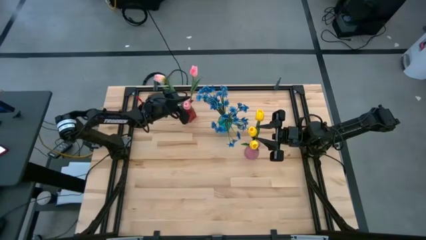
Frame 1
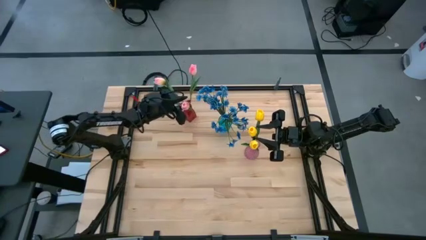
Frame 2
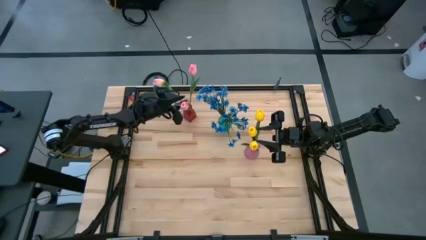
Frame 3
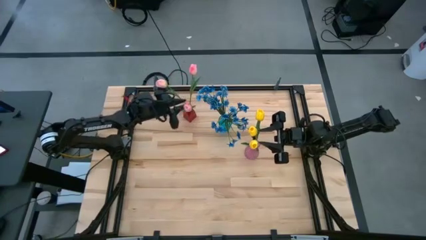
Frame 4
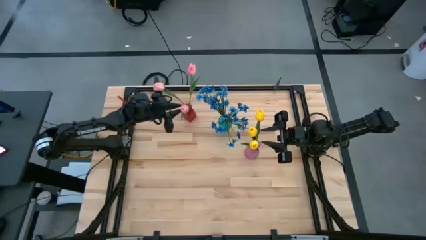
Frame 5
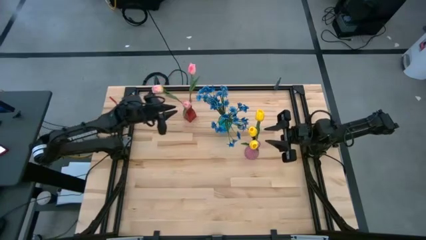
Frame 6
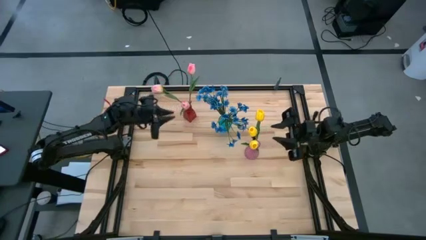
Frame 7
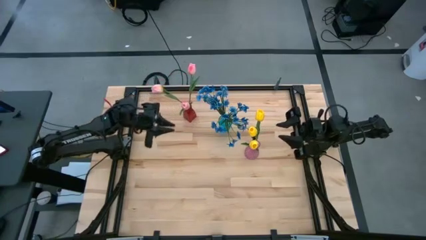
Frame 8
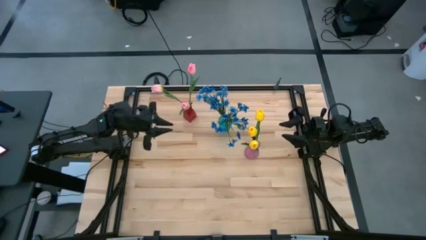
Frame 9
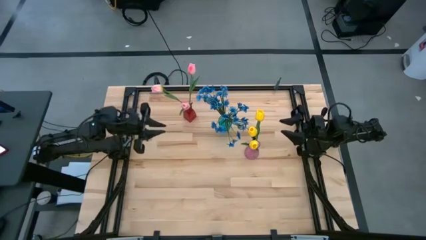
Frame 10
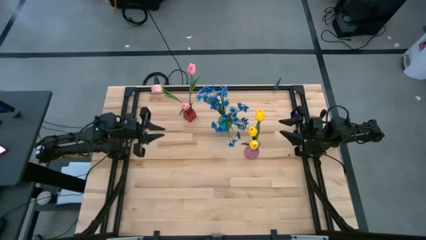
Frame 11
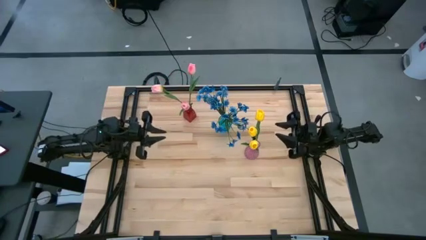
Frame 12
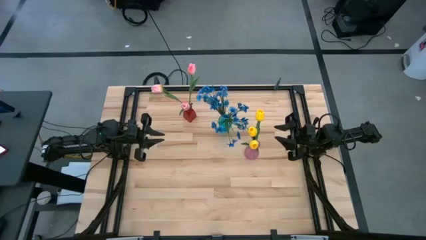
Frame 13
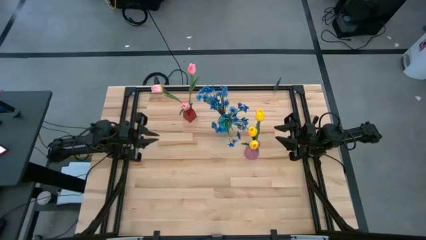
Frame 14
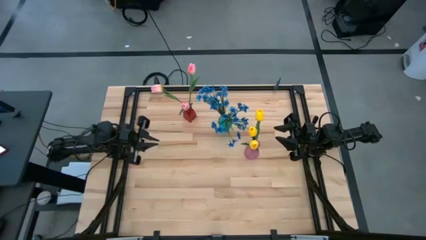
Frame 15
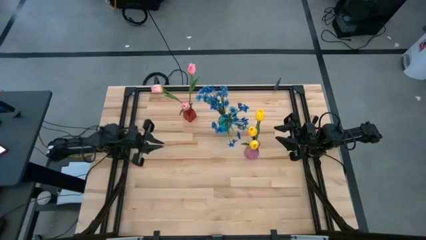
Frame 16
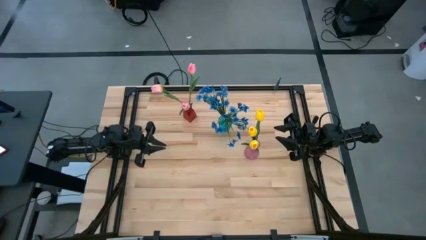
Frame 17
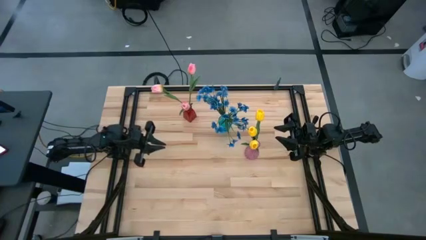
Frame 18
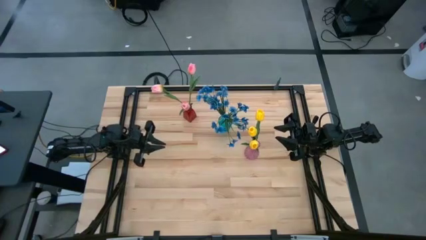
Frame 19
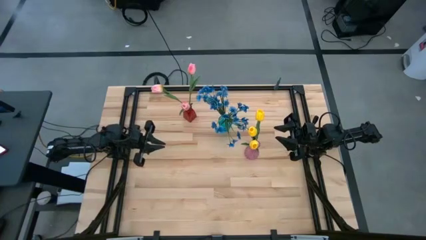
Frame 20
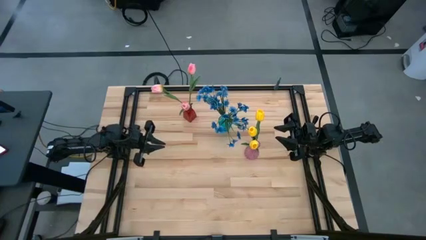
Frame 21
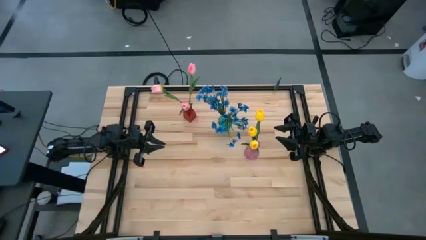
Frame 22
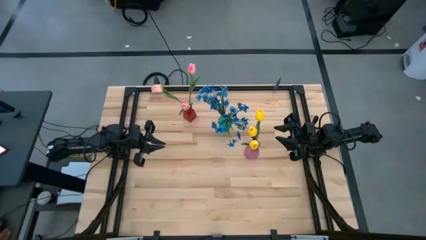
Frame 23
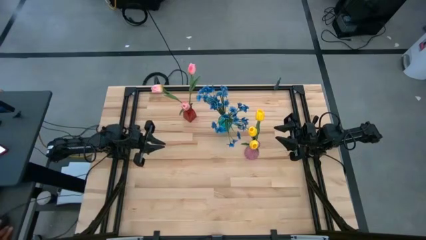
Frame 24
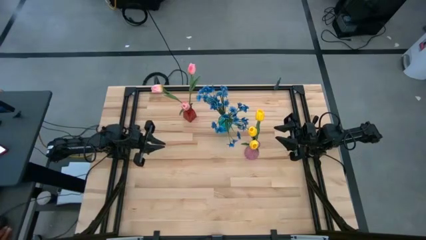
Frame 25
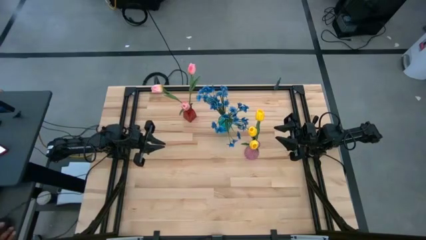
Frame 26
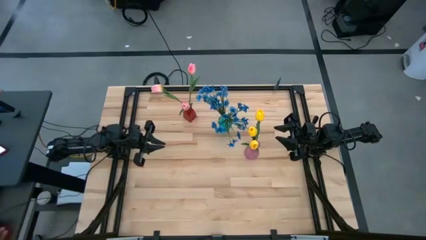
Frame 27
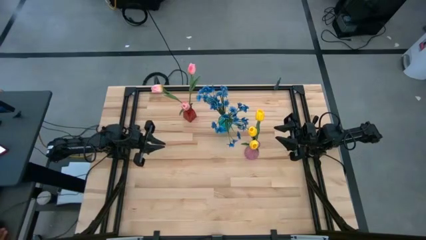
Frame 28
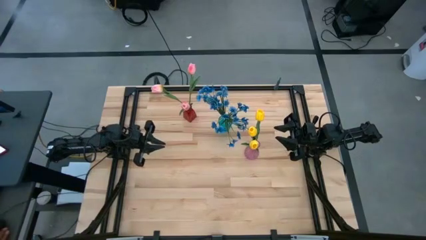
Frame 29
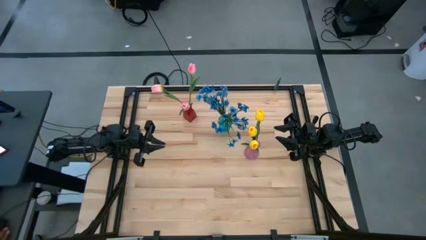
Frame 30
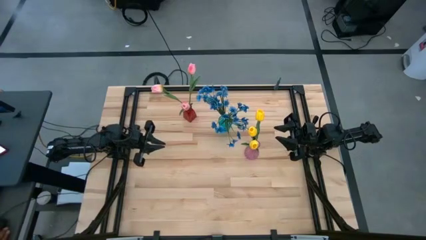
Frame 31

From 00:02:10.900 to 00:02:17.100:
Task: Sort flowers into vase by color
Return to Home Position

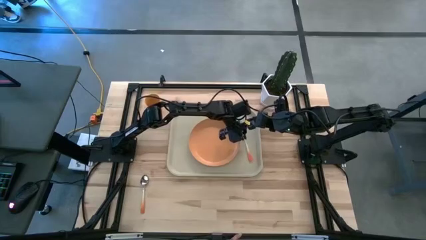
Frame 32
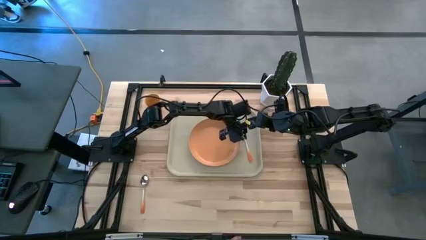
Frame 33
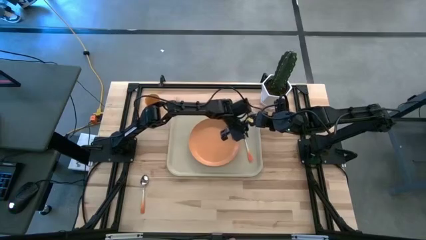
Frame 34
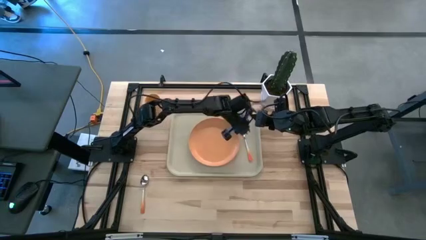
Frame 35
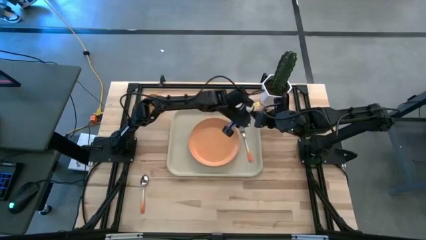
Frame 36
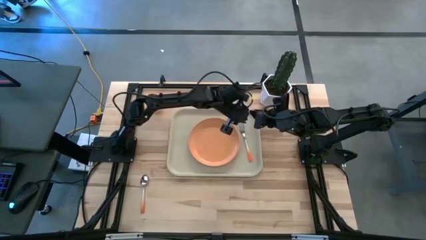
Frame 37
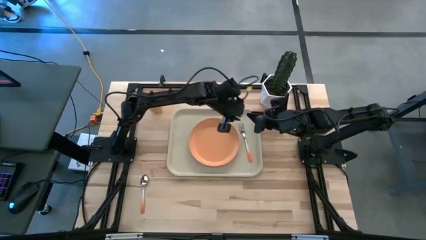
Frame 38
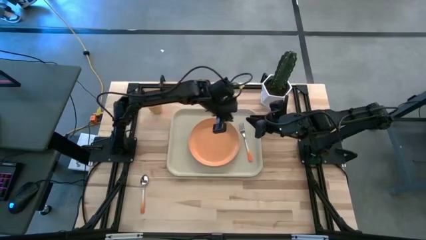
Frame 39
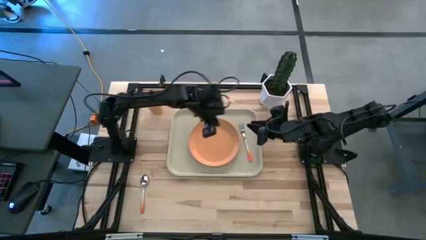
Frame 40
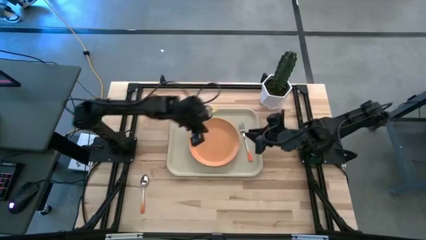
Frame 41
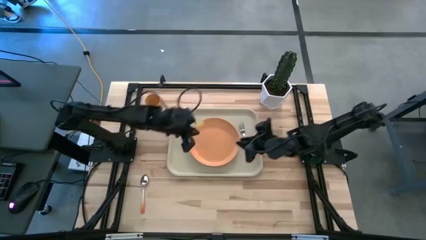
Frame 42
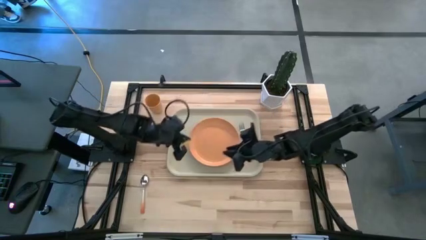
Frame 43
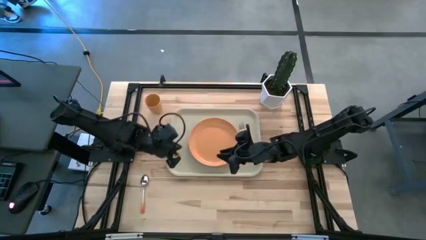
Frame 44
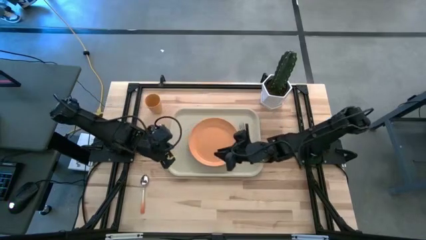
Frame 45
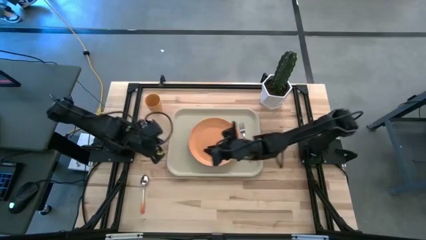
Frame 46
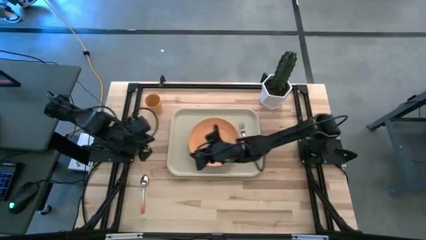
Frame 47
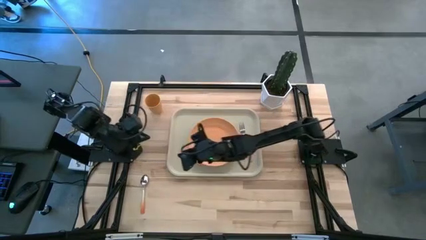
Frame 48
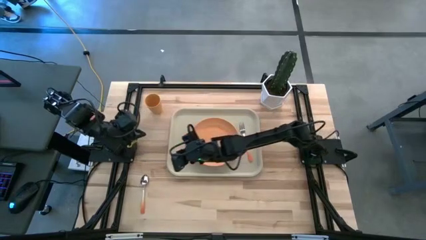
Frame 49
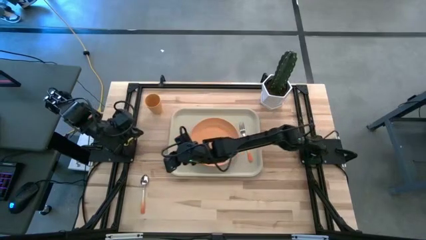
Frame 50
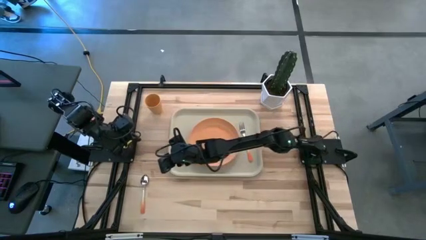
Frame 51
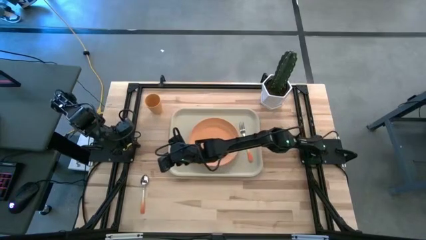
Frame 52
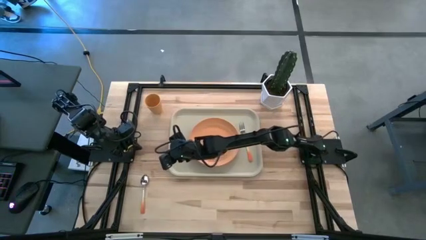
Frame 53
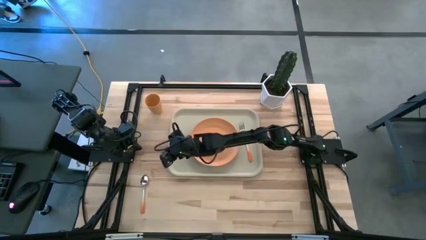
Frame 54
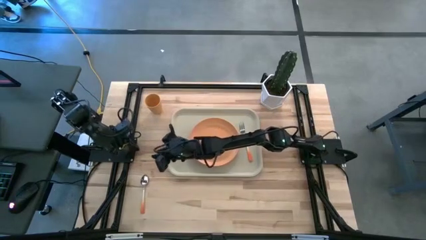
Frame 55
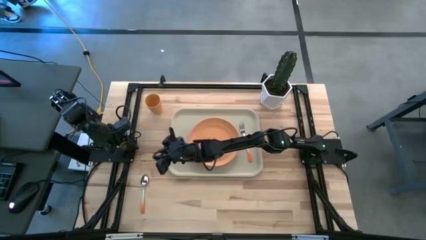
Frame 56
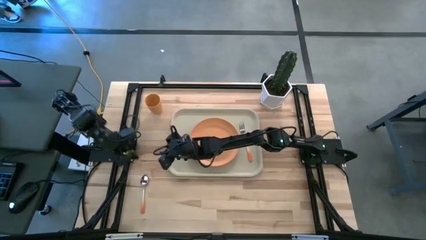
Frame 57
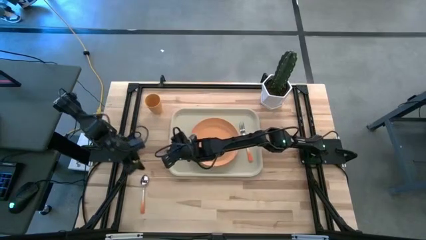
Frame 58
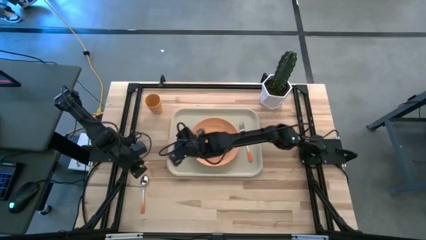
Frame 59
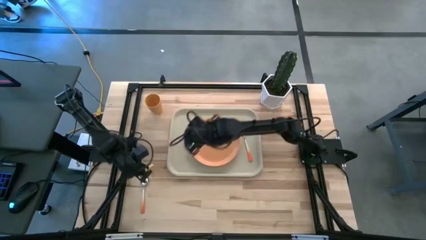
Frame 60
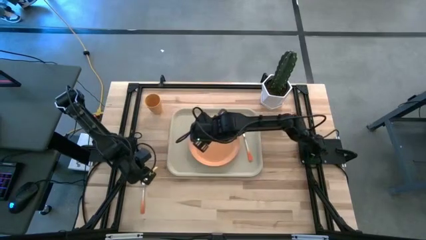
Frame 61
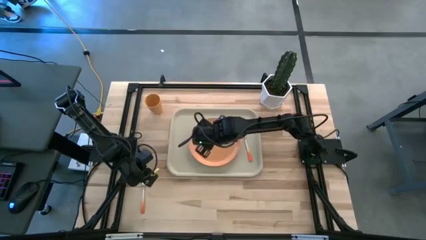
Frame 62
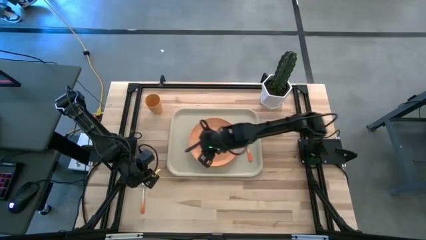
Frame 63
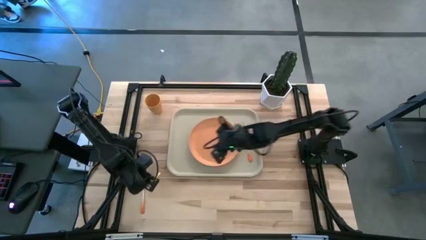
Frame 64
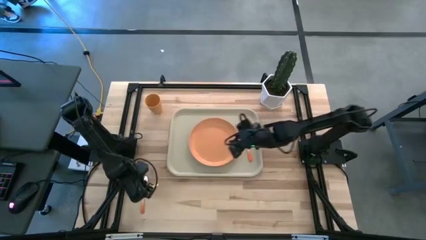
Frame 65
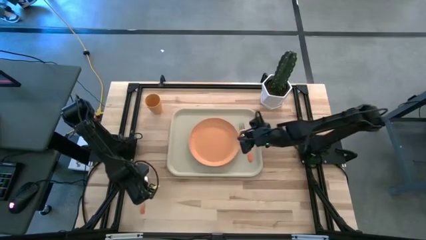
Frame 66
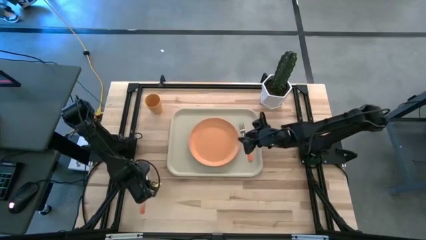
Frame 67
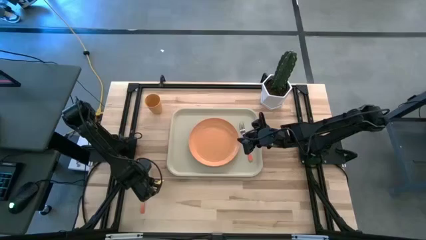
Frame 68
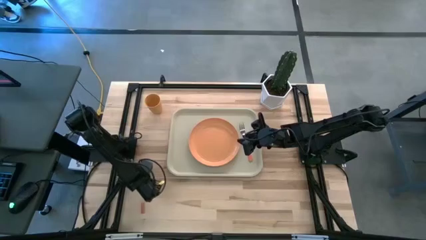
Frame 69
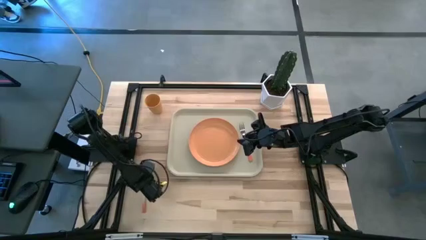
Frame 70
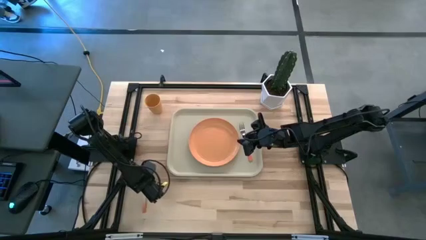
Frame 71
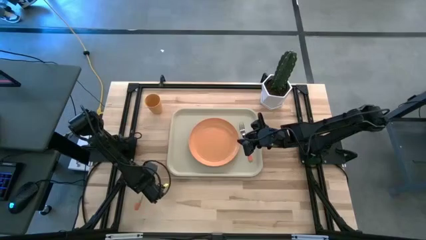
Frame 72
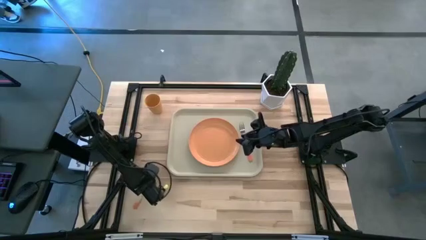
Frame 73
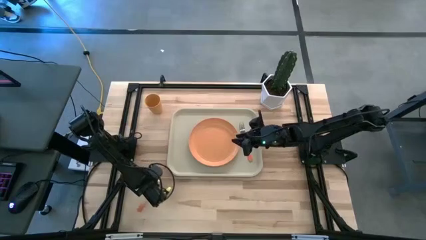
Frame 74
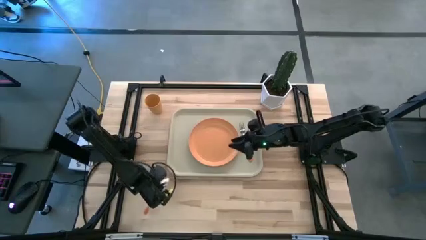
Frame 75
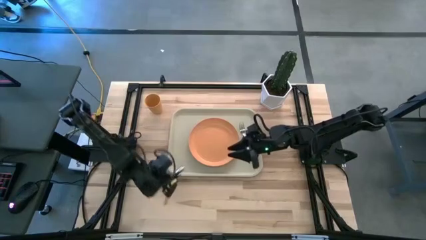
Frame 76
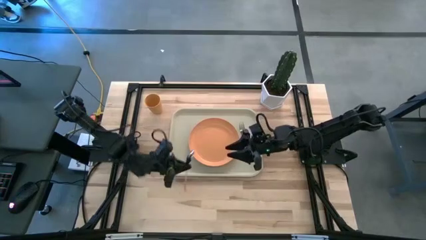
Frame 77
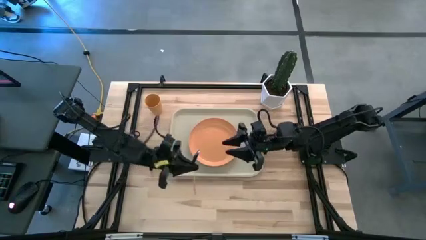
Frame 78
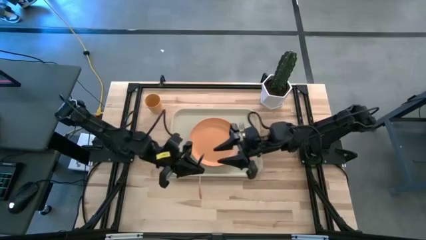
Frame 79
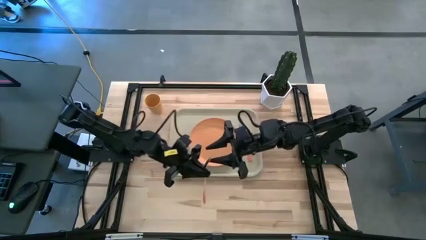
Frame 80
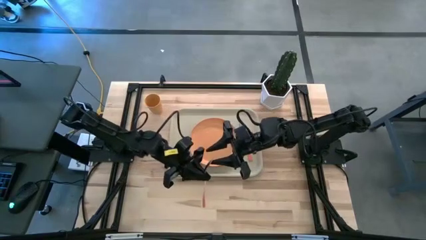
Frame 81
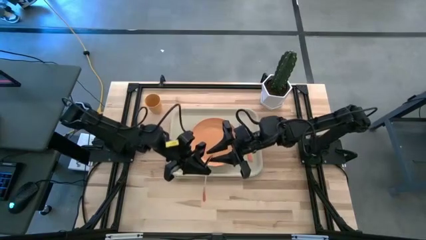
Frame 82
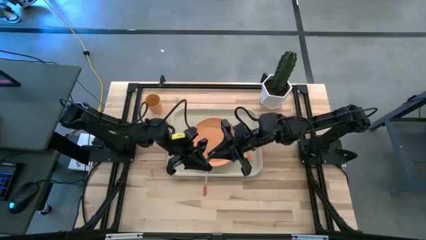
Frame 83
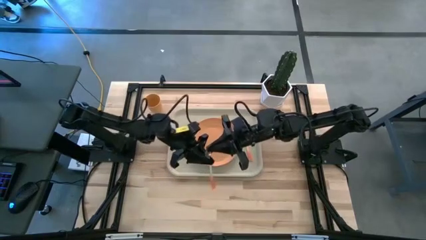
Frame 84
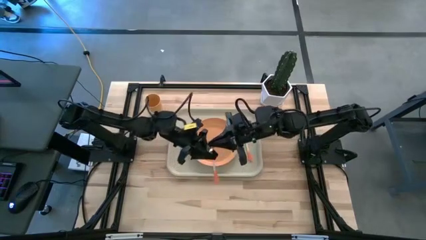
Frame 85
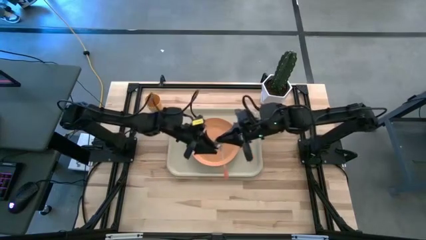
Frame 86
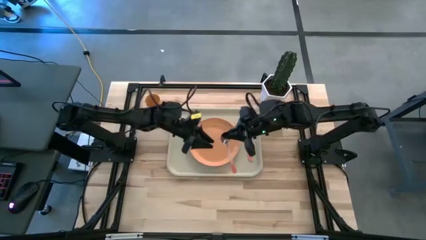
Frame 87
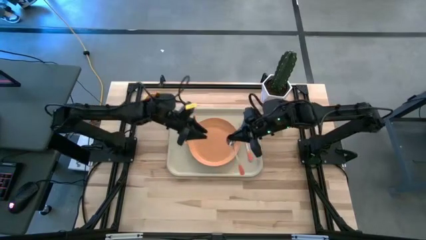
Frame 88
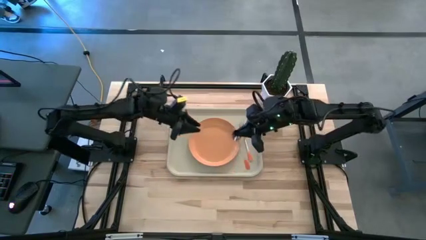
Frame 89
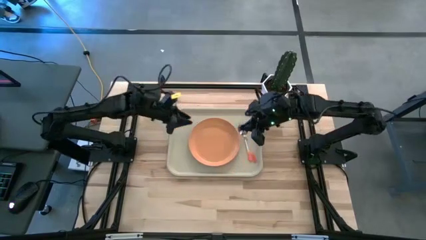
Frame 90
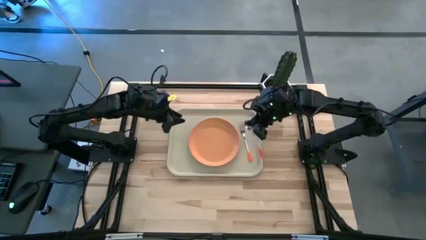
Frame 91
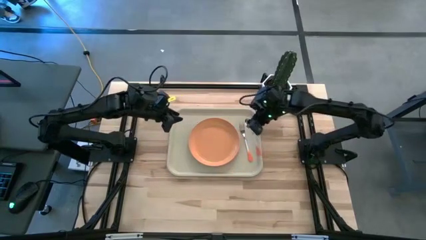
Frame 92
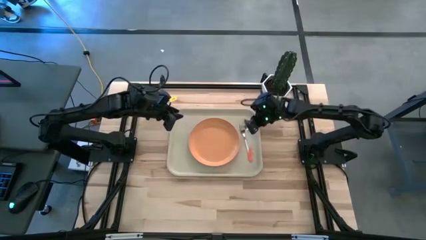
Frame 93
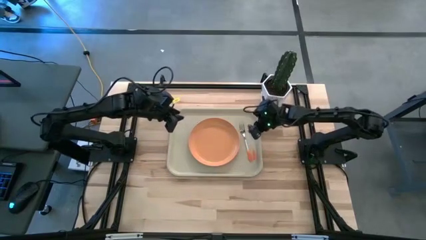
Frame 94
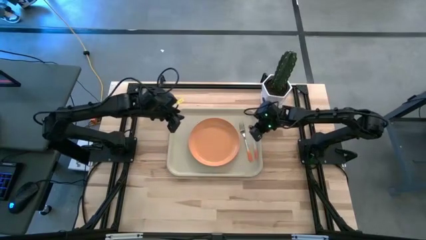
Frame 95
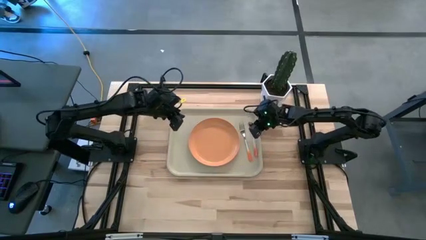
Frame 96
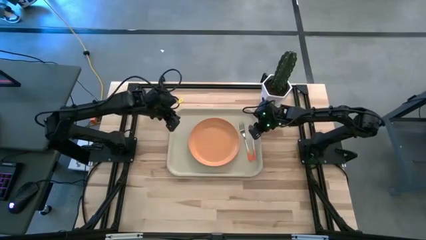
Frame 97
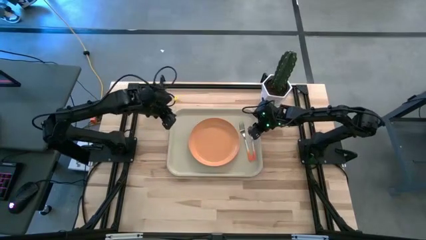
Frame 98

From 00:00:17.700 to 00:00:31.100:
Task: Pick and place plate/cup/fork/spoon on tray
Put the orange spoon on the white tray to the right of the orange fork
